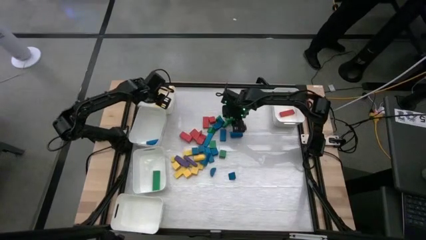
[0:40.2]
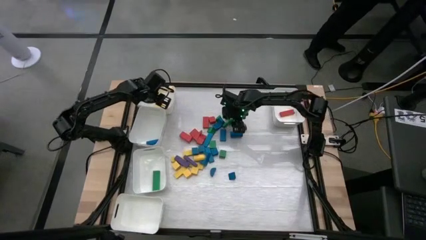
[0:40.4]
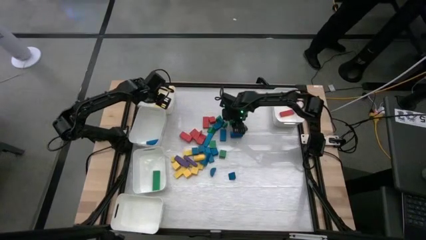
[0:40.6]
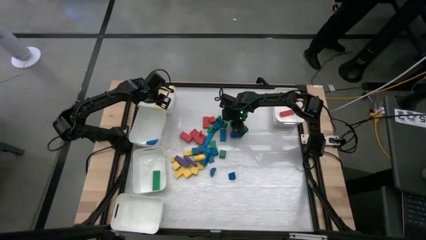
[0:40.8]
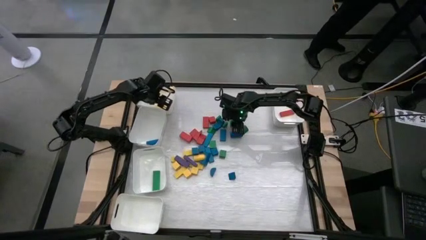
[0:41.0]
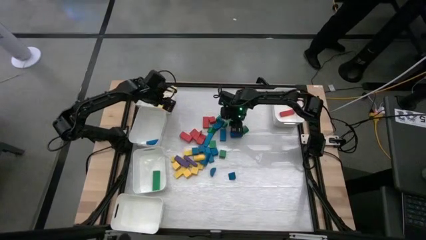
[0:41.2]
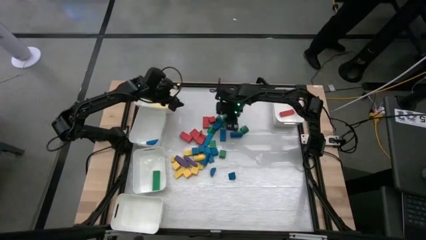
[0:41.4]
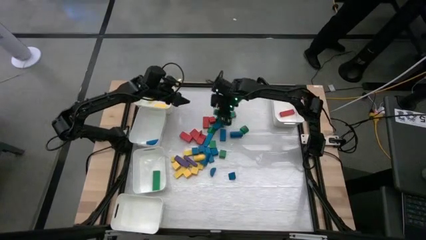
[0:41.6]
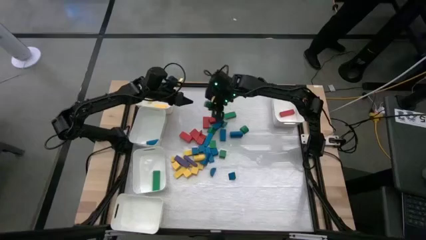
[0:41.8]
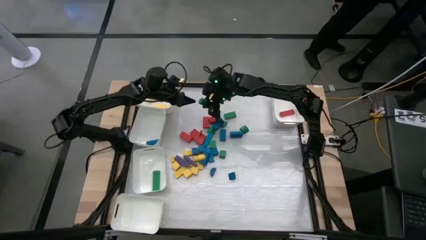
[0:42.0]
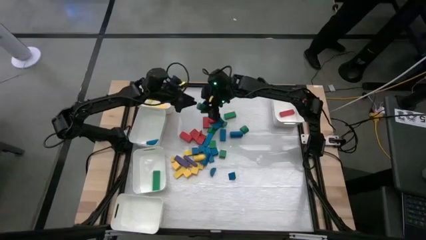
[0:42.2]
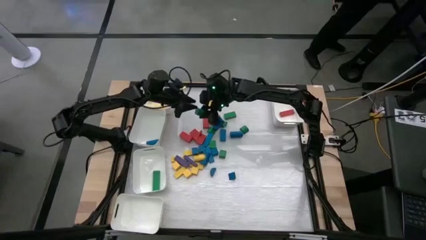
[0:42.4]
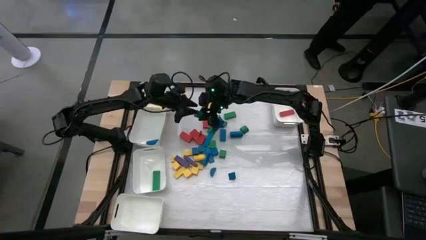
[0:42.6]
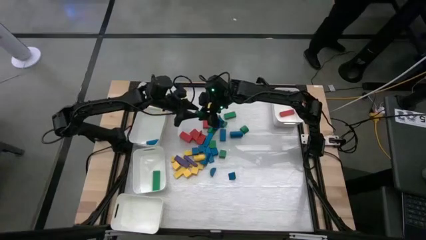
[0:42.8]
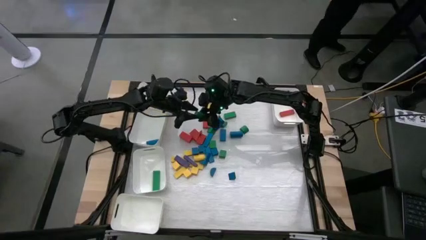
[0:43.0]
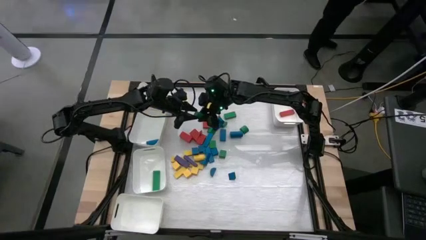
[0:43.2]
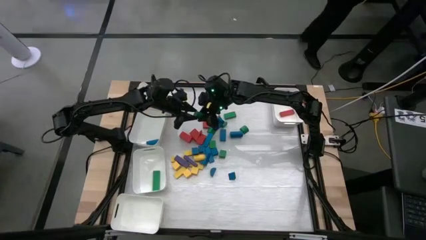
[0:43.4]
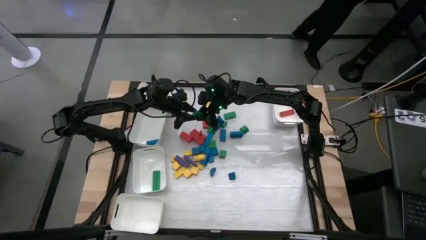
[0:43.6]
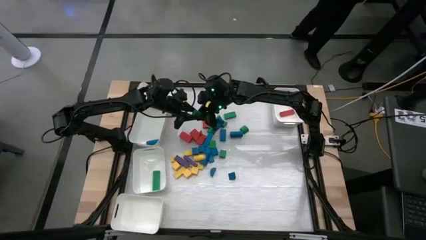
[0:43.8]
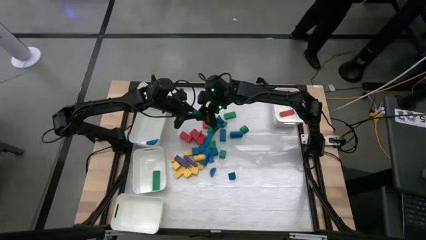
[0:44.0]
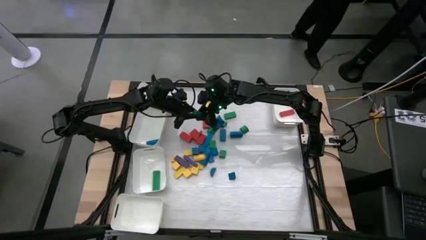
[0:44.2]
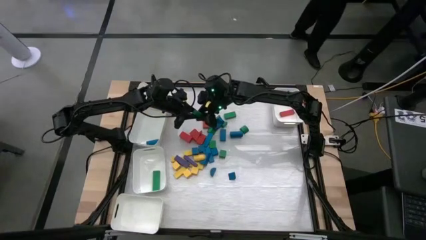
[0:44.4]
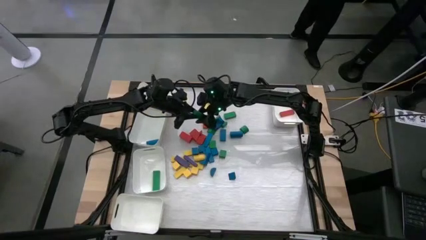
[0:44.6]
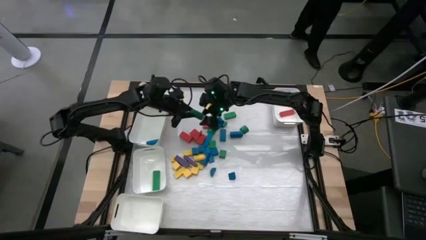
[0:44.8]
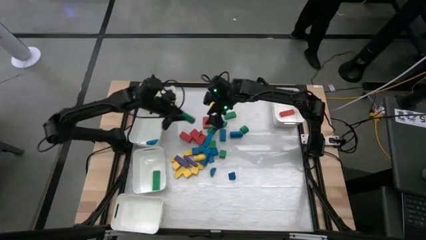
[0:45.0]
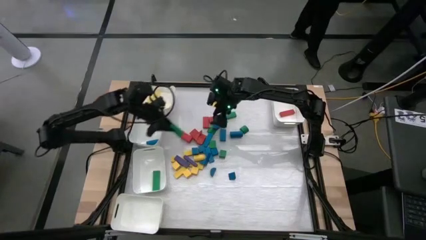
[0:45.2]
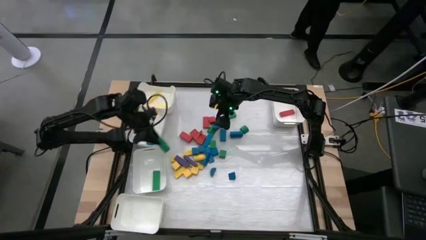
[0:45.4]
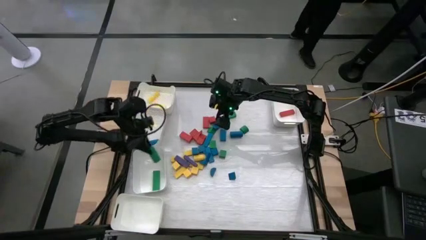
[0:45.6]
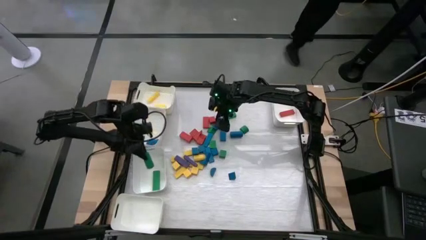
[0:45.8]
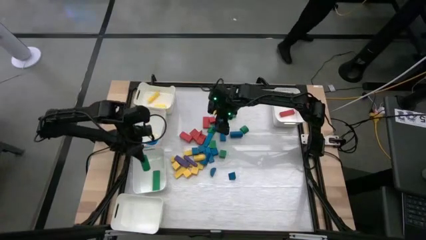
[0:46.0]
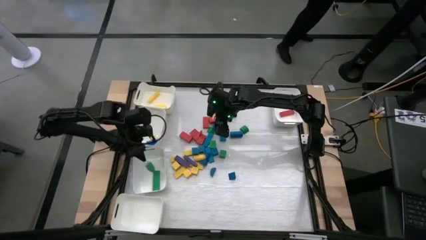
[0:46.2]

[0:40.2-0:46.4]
Task: Sort blocks
Put the green wooden block into the bottom middle left white bin

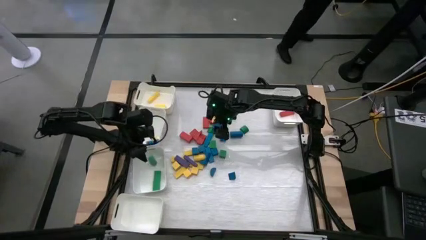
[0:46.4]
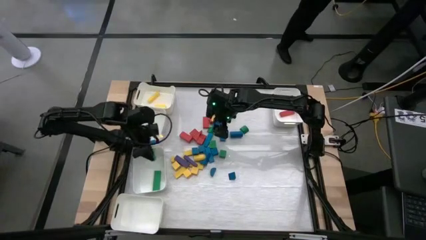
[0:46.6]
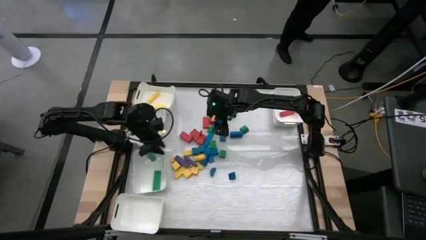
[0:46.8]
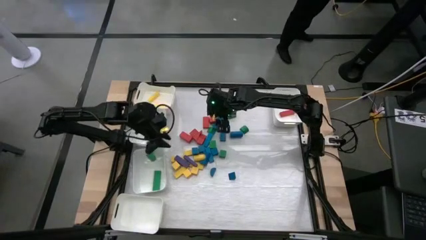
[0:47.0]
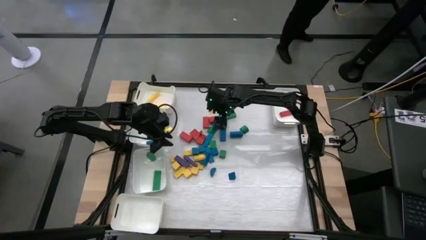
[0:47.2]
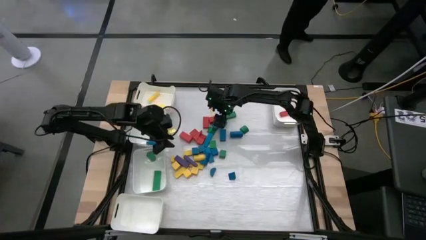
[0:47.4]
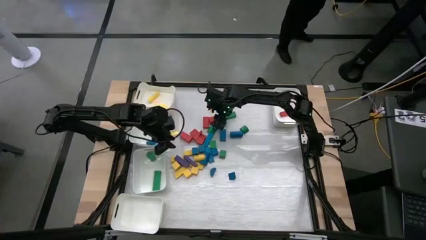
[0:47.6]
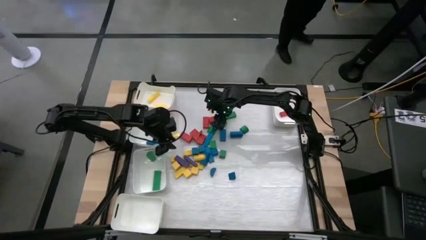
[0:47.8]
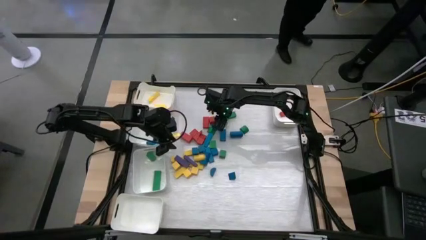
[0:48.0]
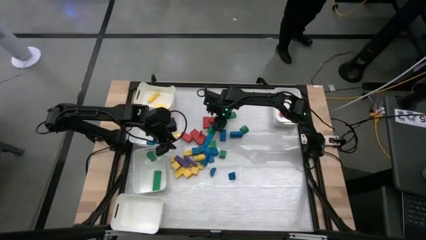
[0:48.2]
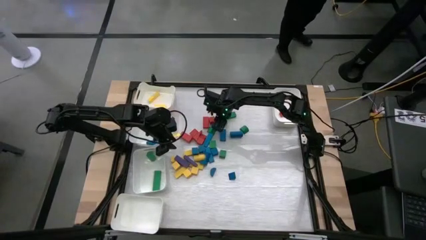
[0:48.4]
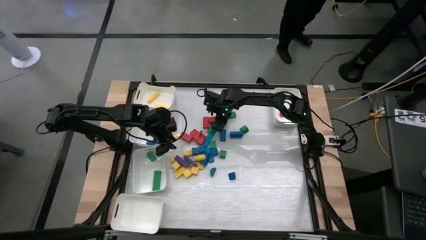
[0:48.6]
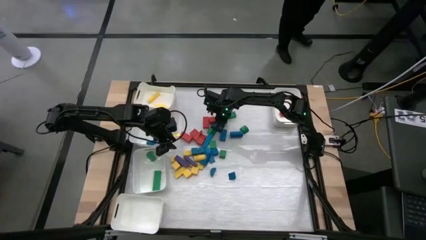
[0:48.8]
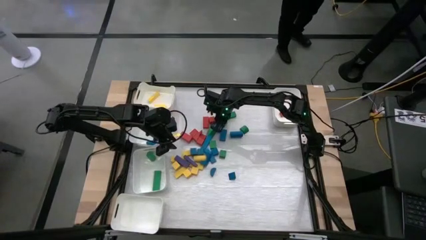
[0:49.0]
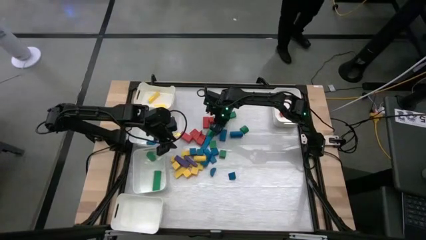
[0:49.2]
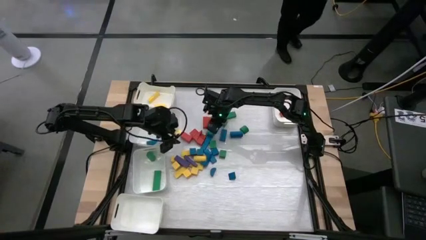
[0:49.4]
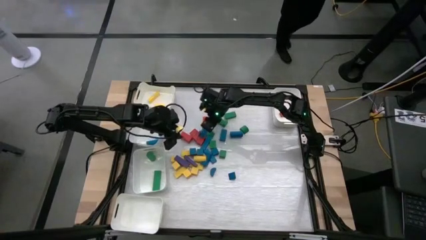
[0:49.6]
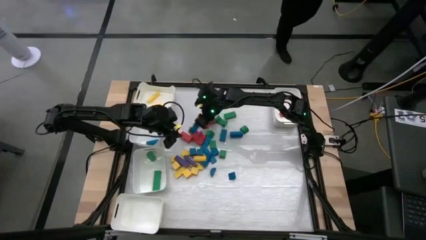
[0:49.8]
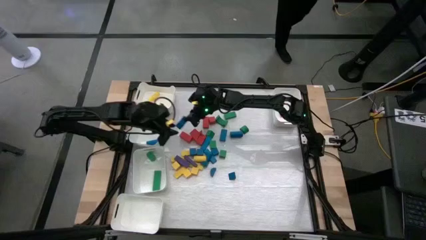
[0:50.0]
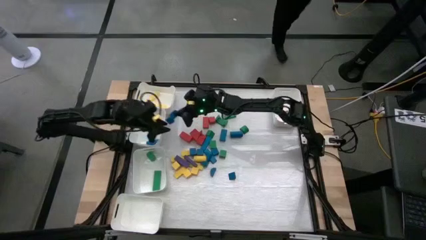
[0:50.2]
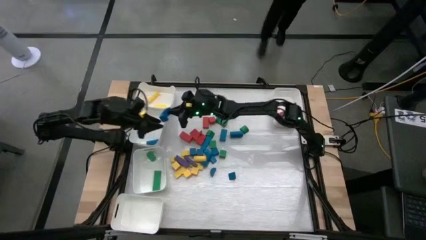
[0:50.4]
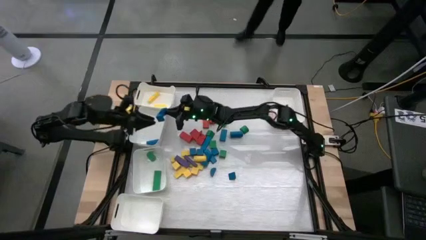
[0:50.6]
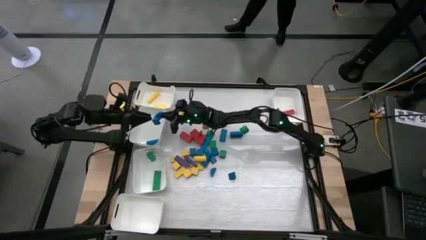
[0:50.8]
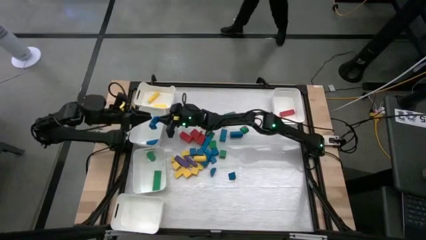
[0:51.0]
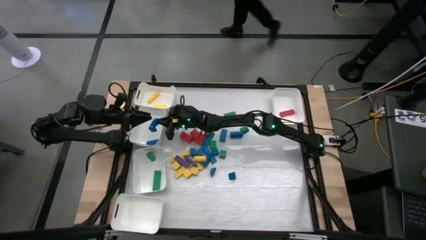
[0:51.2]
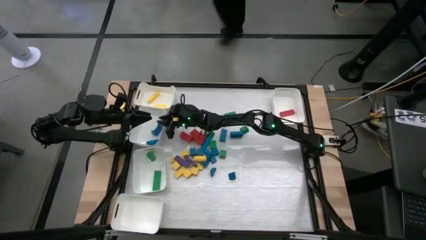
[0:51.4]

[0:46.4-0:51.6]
Put the blue wooden block into the top middle left white bin

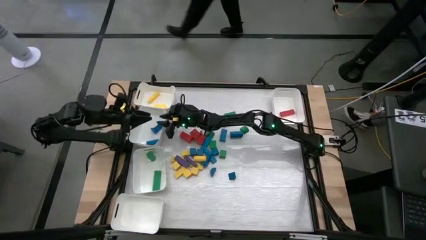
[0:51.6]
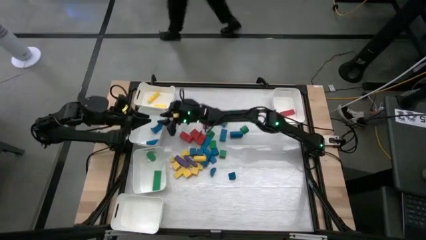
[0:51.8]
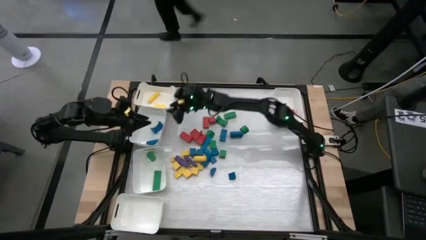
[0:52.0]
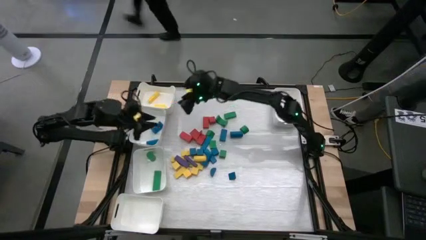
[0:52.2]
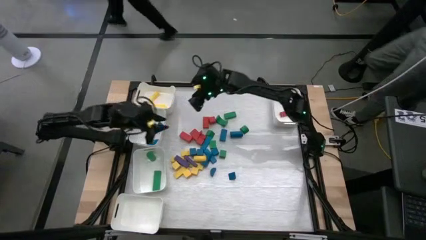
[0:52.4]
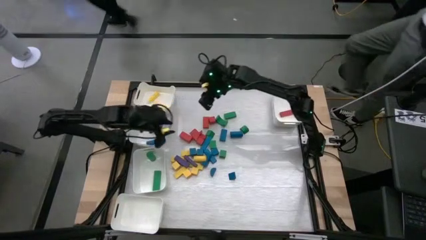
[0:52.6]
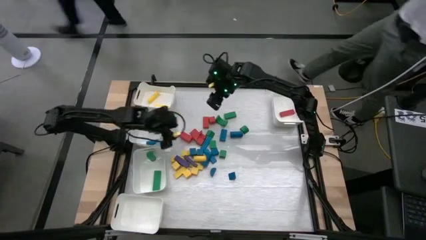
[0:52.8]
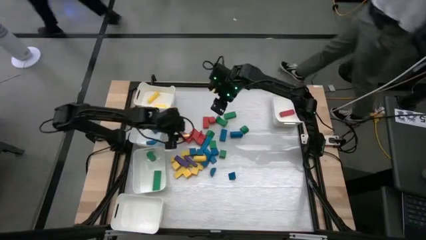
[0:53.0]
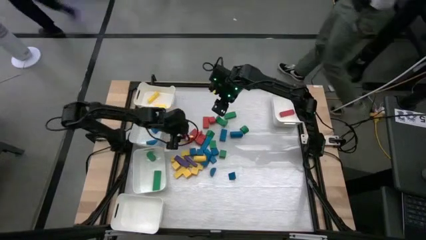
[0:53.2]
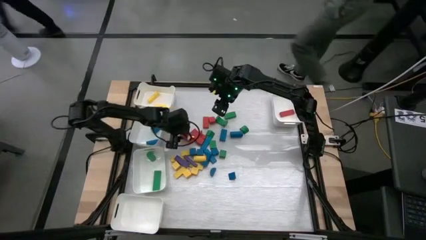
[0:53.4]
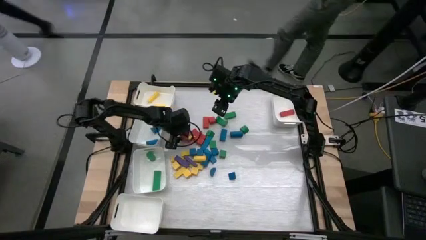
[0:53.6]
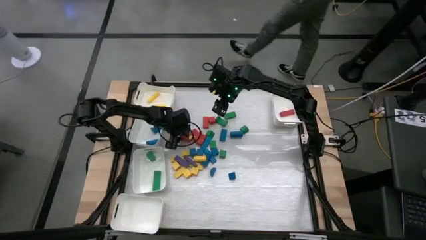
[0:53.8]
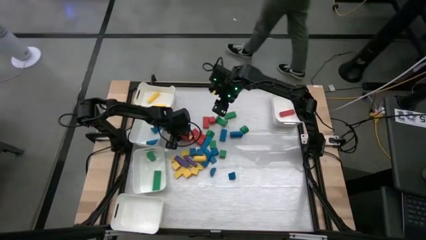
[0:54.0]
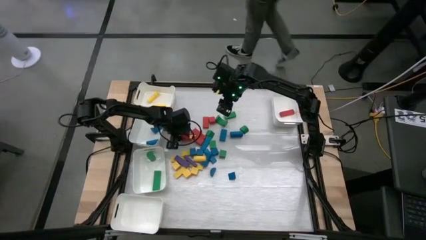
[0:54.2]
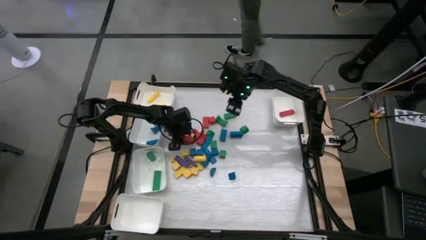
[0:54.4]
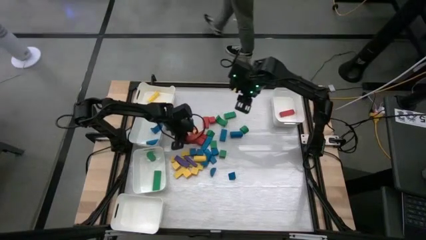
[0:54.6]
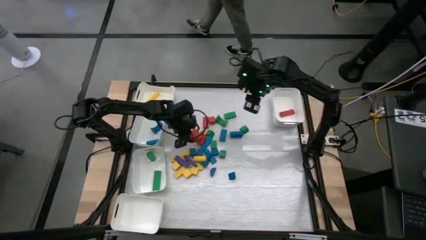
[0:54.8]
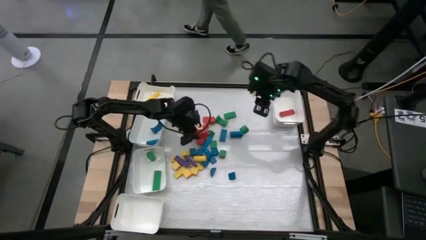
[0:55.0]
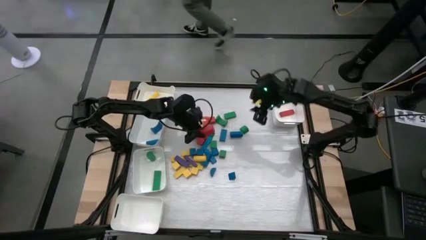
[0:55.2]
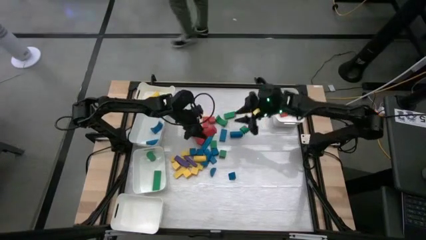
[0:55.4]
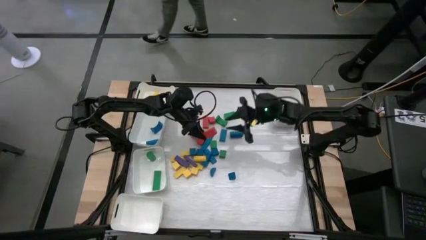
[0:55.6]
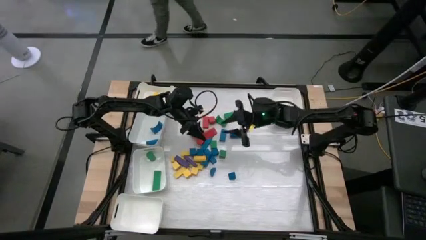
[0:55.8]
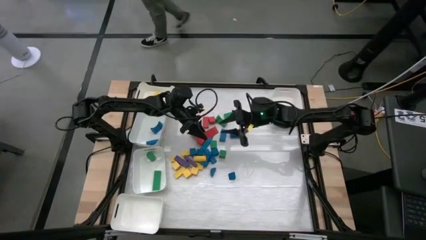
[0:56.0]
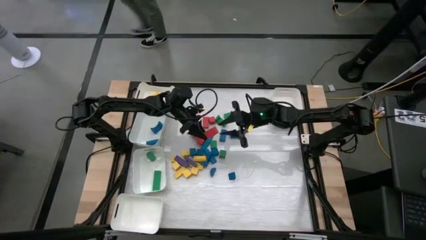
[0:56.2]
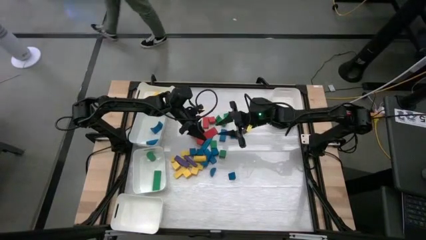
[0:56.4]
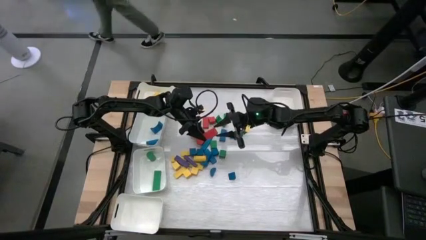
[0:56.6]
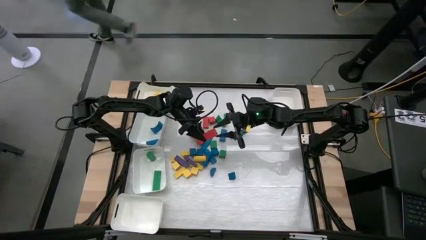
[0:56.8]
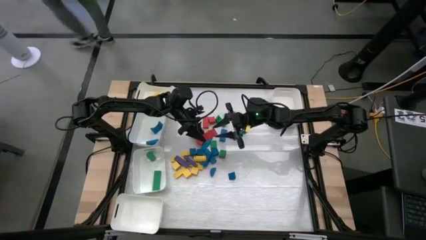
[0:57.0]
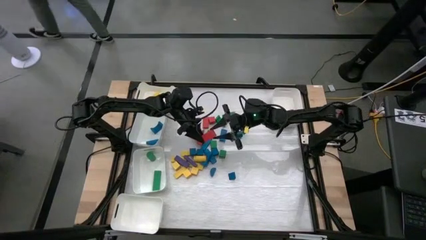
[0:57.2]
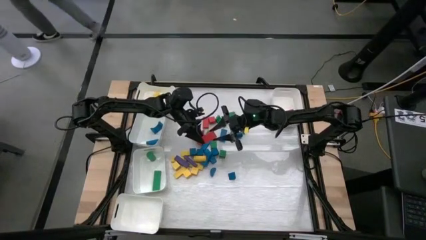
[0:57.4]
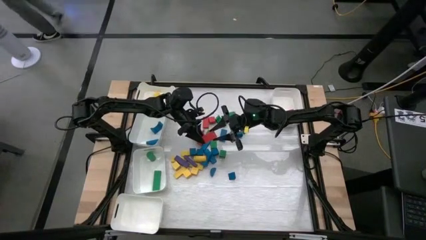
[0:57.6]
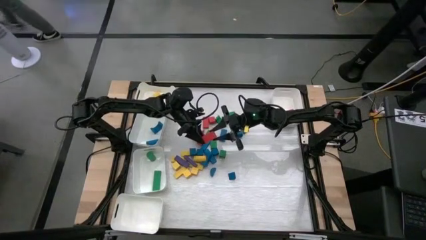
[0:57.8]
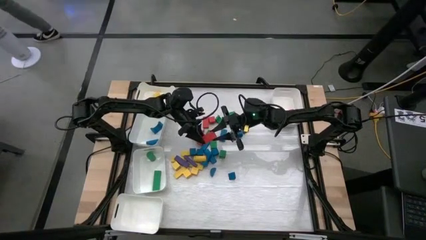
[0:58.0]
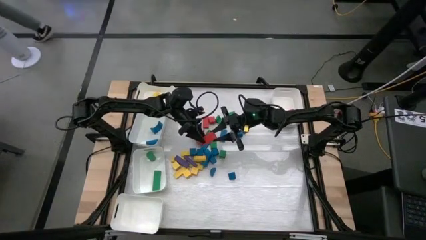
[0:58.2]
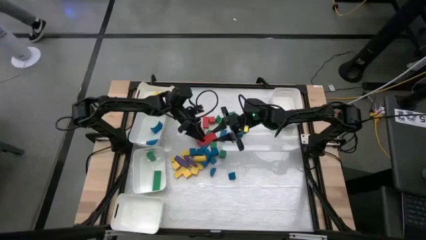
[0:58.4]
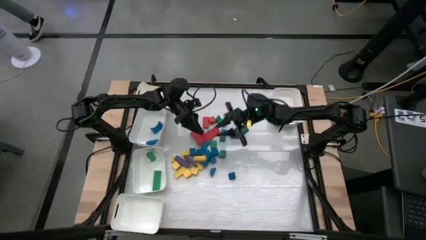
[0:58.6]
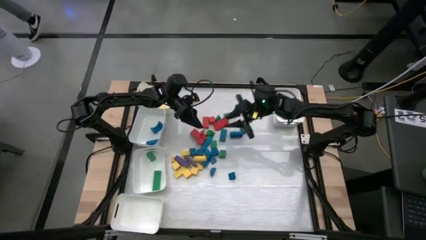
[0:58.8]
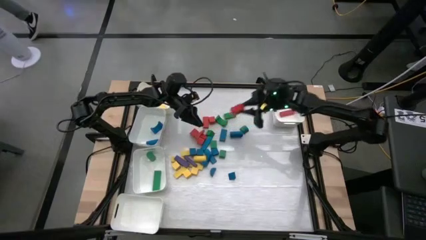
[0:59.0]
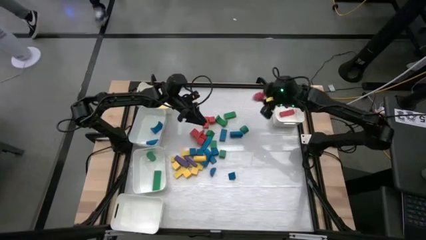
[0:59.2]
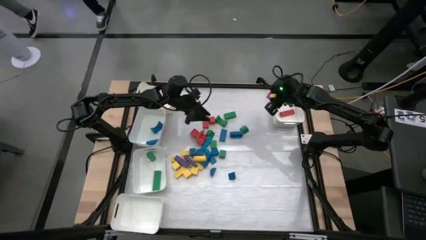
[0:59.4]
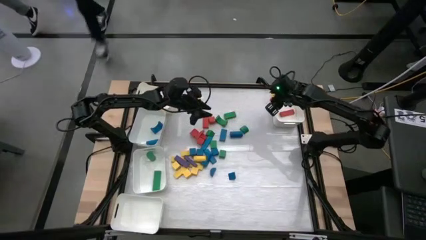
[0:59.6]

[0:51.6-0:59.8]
Put the red wooden block into the top right white bin
